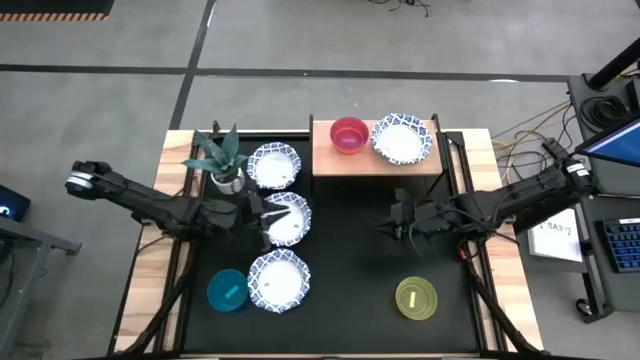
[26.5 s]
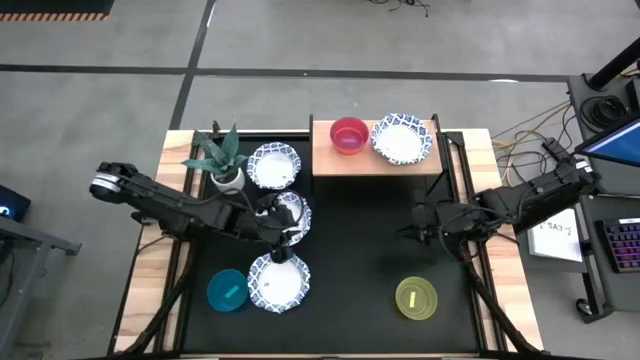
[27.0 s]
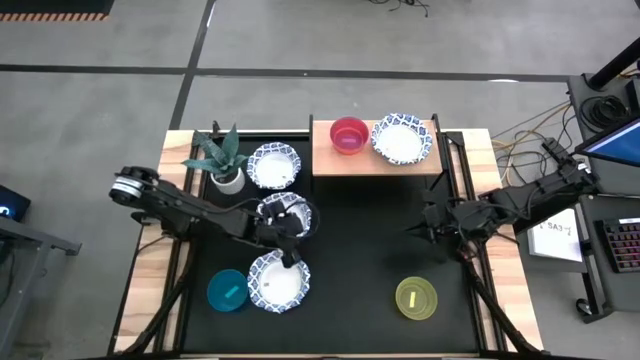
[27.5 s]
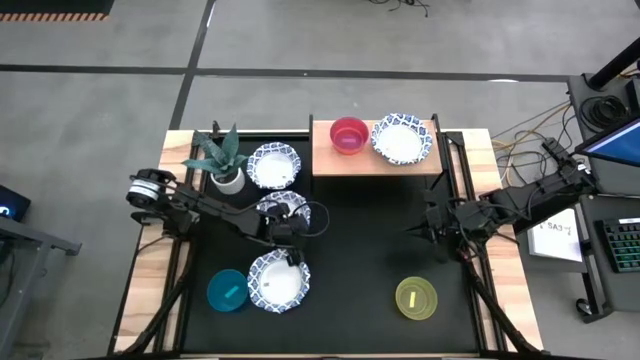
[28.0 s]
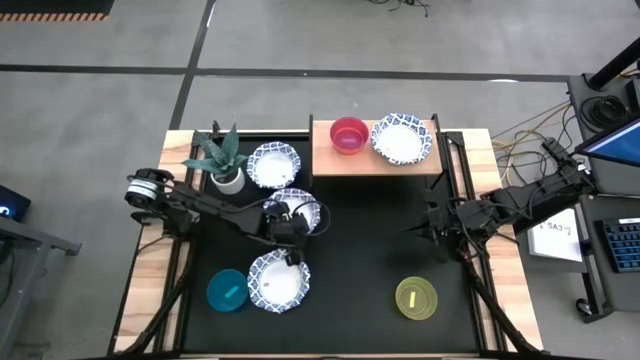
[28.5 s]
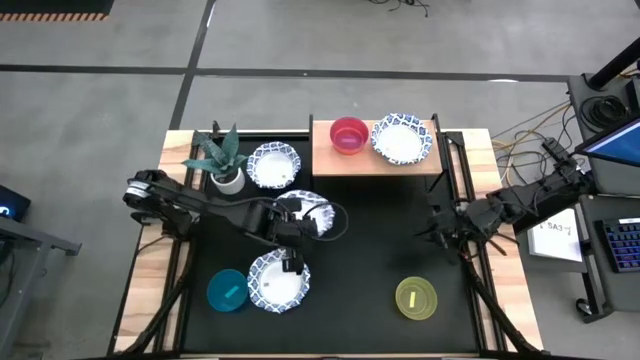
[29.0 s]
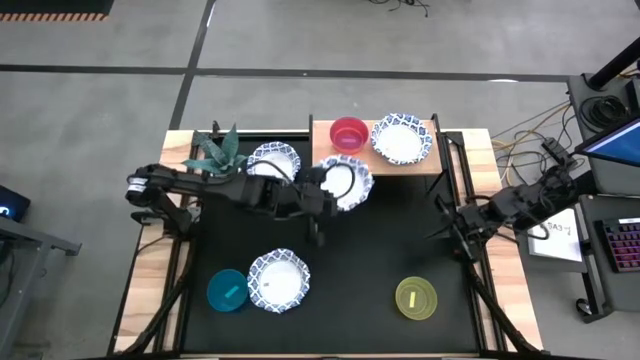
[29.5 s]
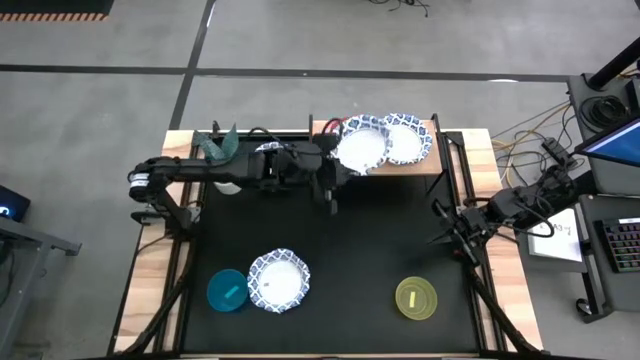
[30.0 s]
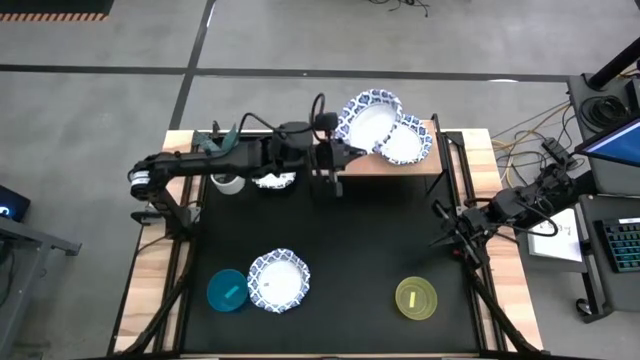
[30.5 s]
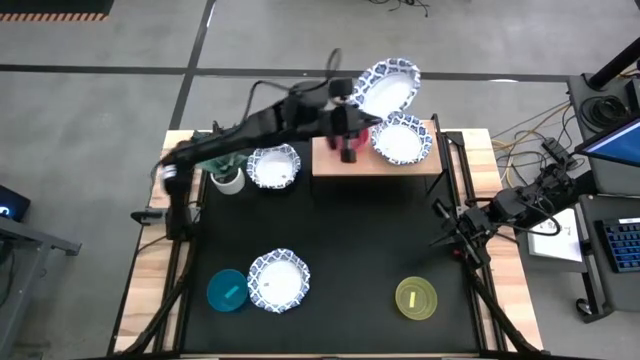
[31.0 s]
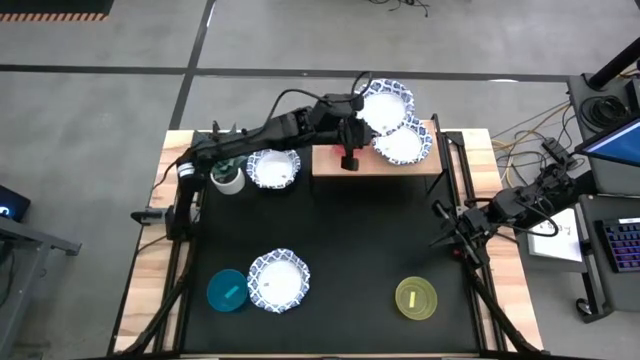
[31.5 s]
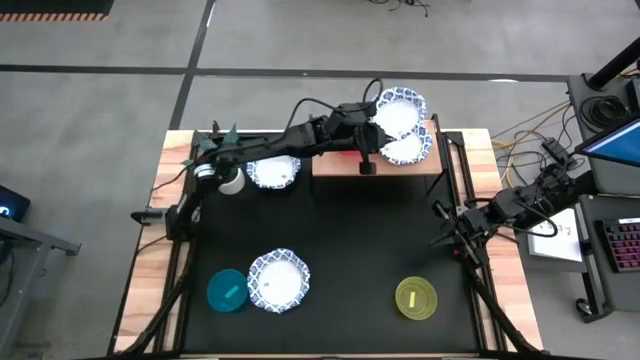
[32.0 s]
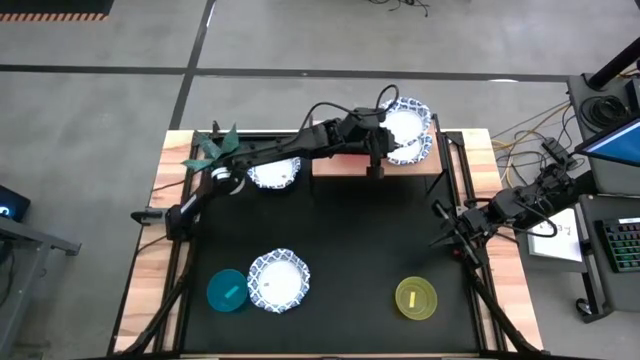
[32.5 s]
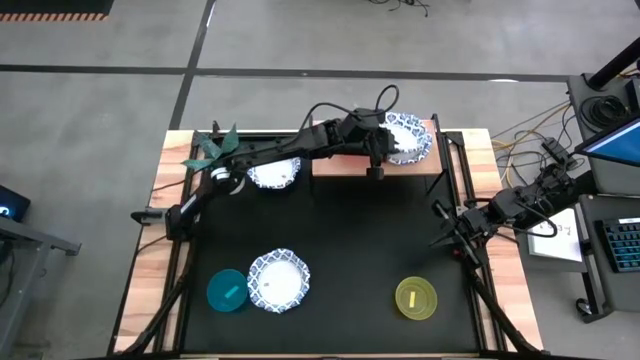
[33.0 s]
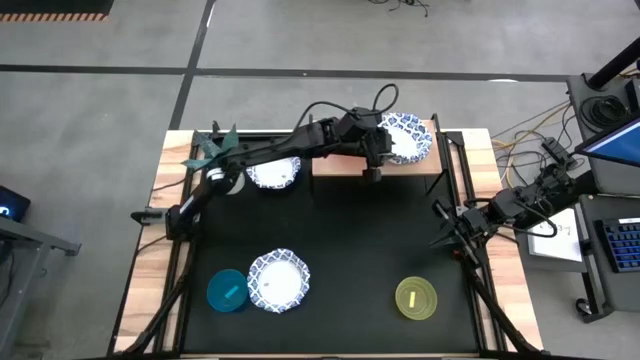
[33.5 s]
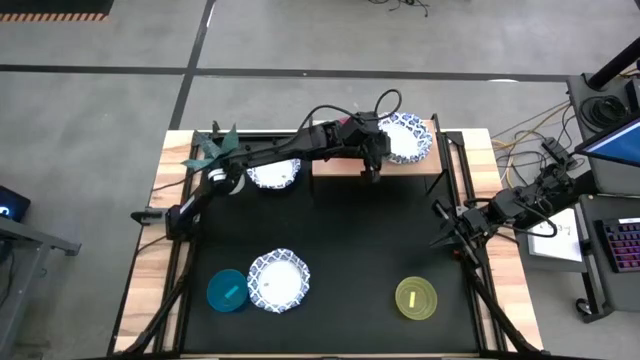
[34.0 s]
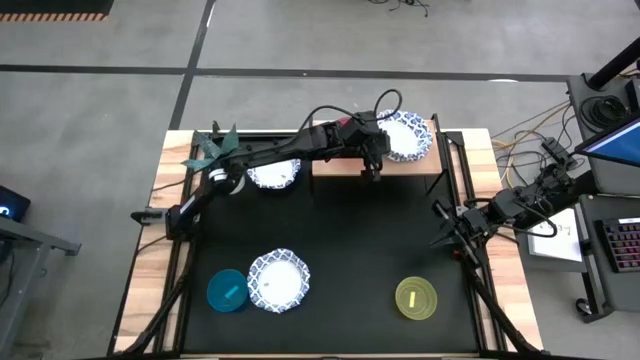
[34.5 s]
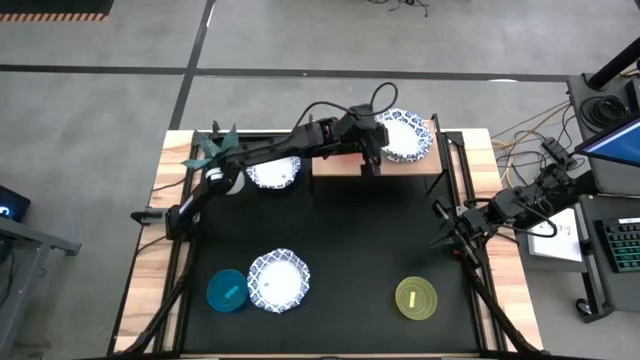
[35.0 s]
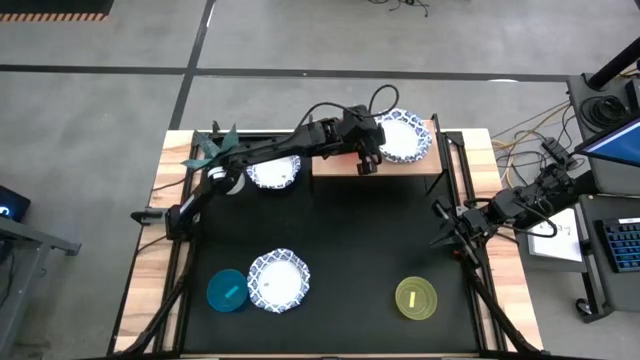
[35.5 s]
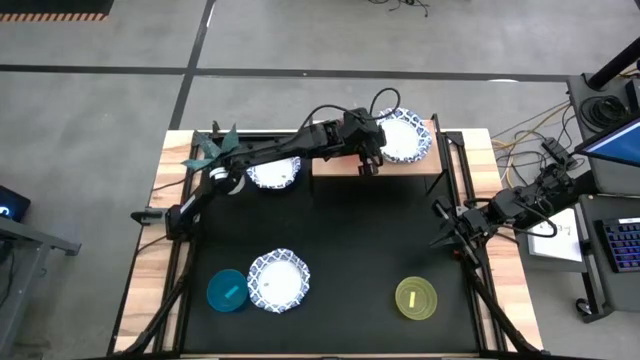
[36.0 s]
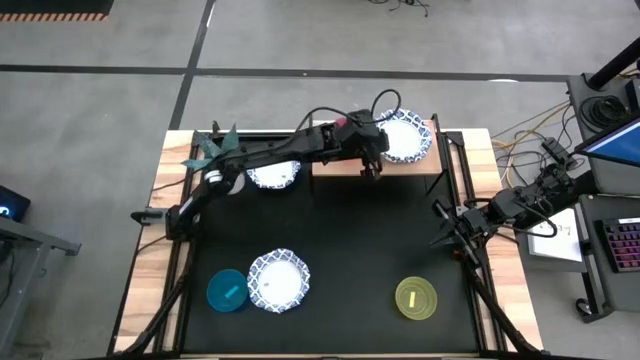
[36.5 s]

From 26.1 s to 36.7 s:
Task: Place and stack bowls onto a shelf
Stack the white paper plate on top of the white paper plate on the shelf

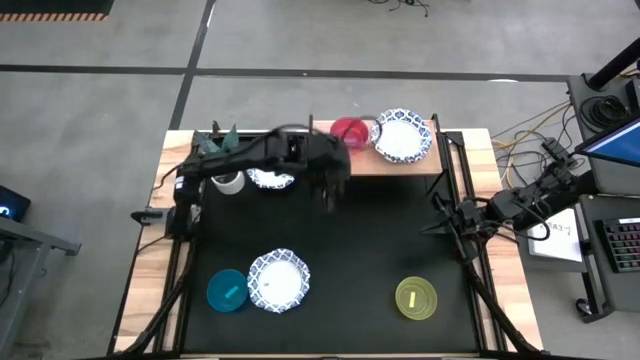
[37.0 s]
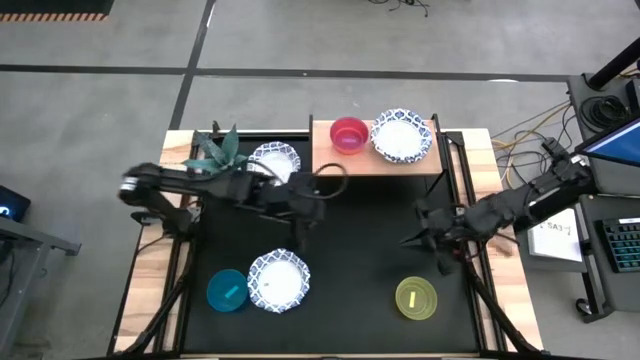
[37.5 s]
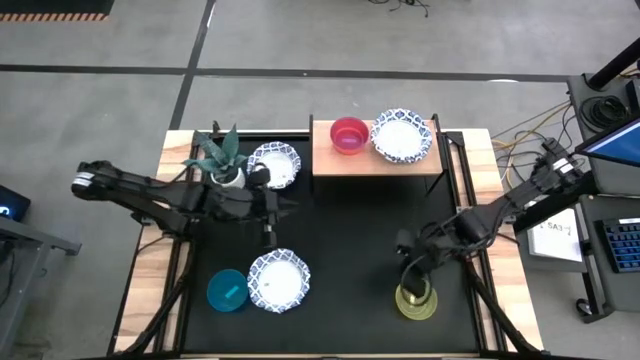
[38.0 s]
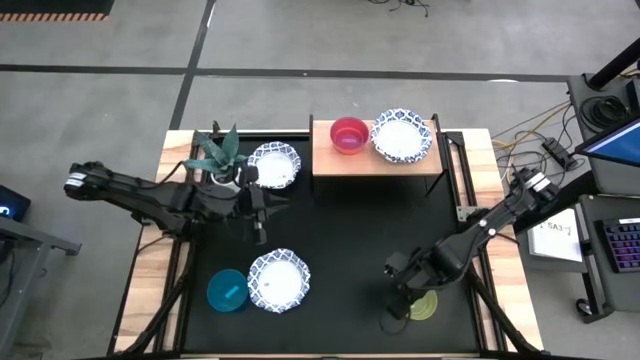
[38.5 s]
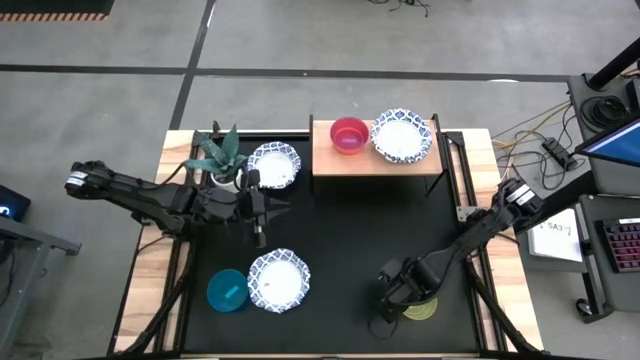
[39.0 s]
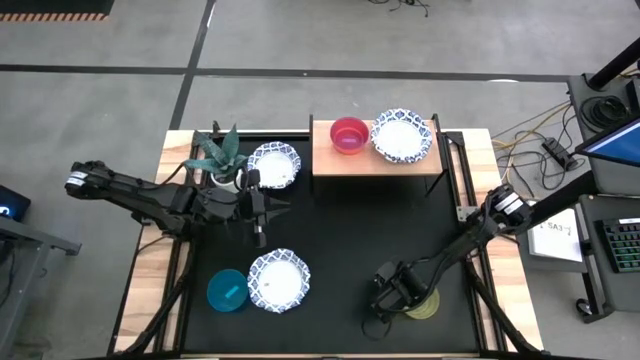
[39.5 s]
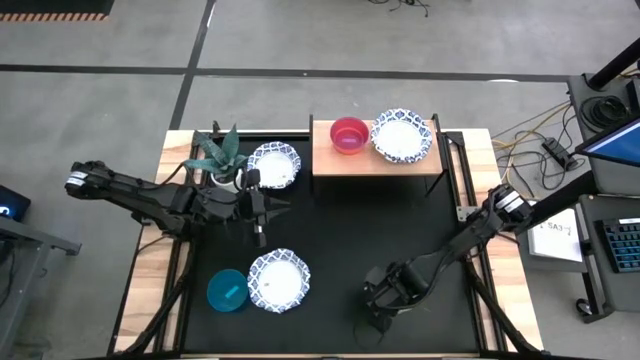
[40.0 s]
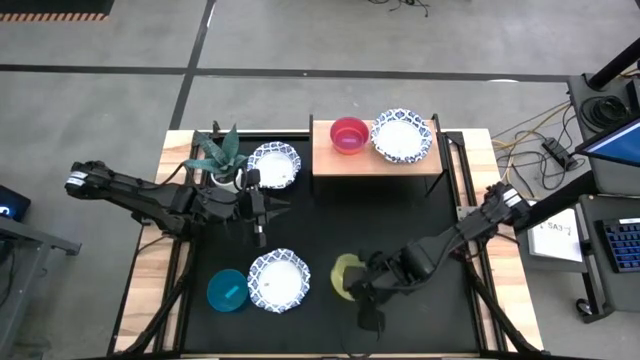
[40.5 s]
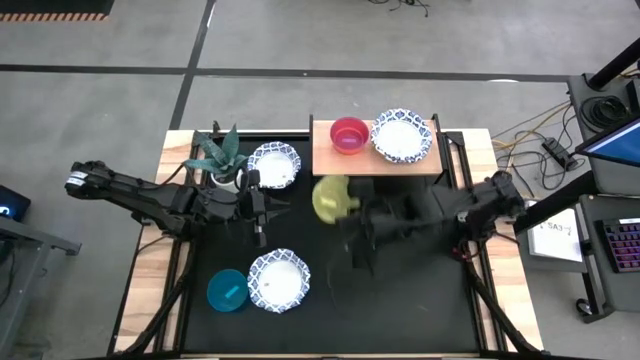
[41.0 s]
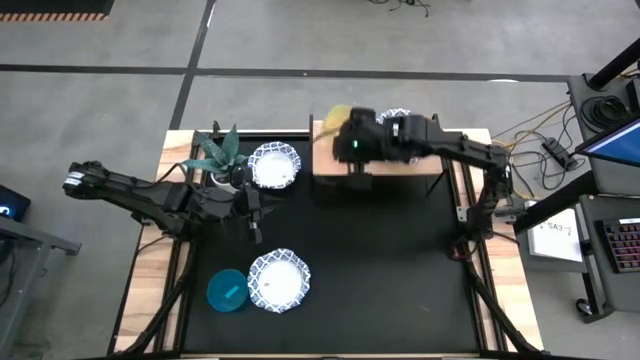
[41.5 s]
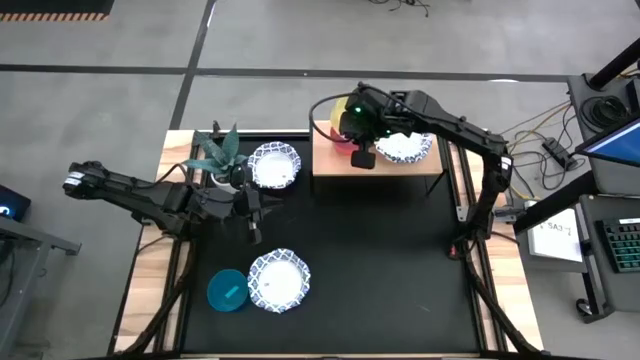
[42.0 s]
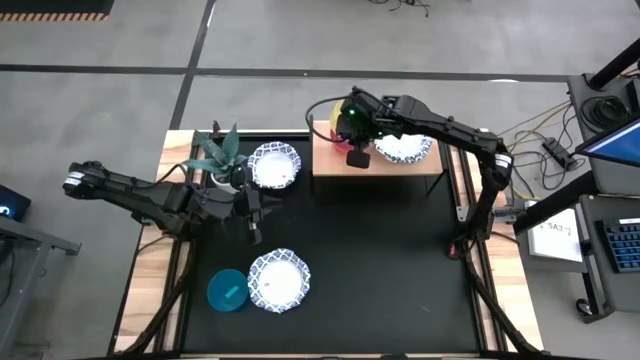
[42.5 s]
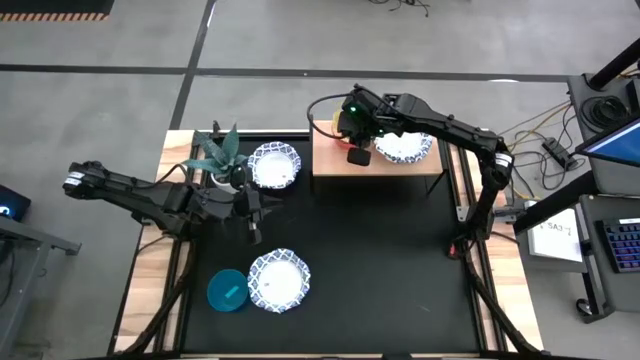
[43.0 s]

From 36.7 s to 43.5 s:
Stack the yellow bowl on the violet bowl on the stock shelf

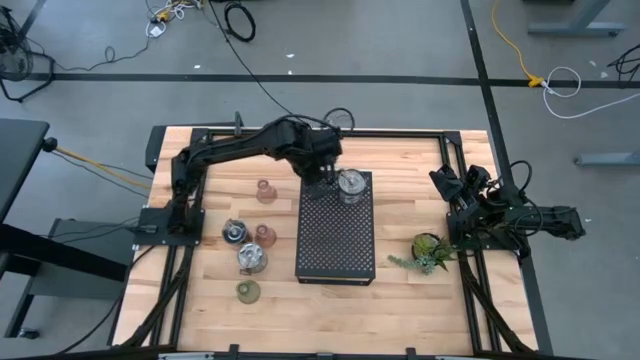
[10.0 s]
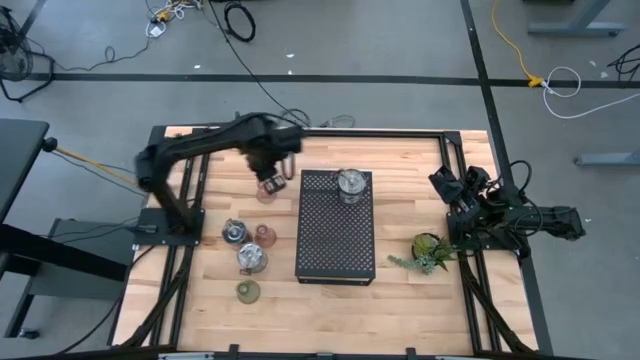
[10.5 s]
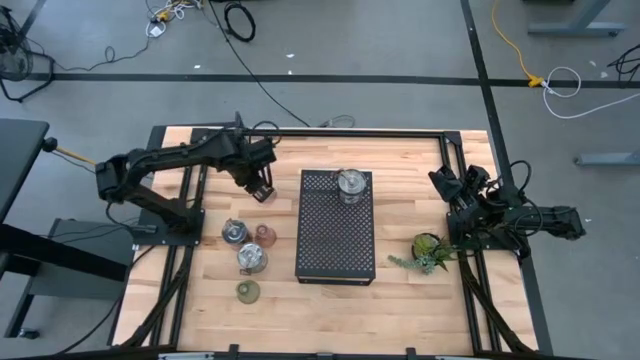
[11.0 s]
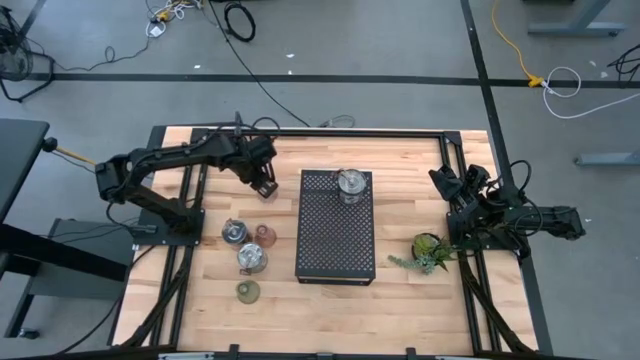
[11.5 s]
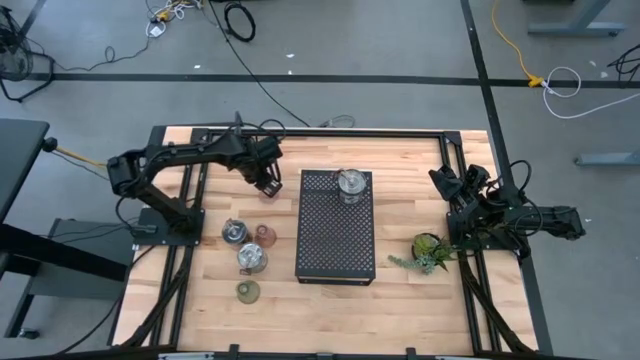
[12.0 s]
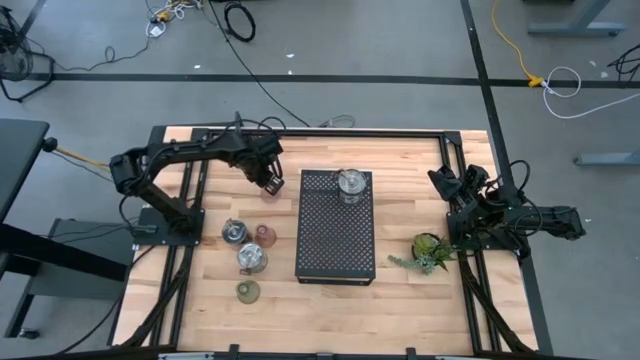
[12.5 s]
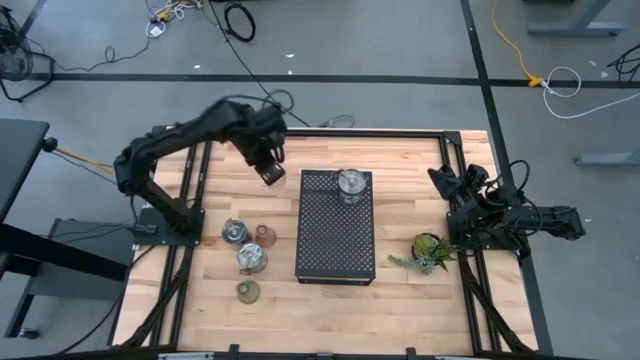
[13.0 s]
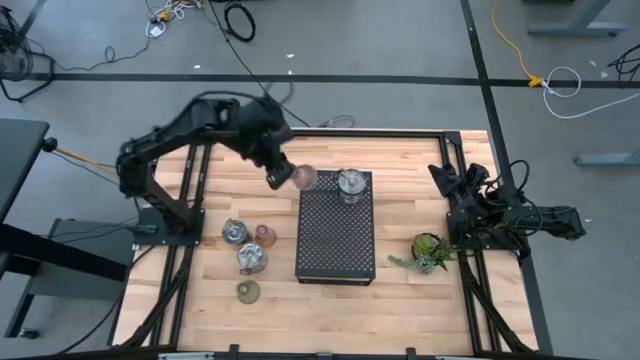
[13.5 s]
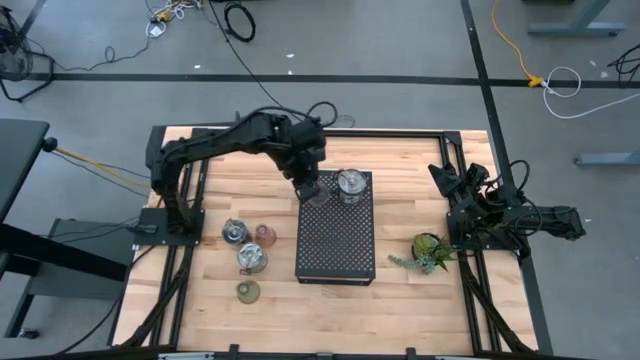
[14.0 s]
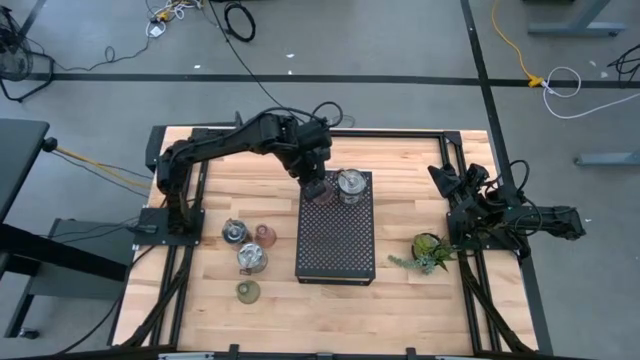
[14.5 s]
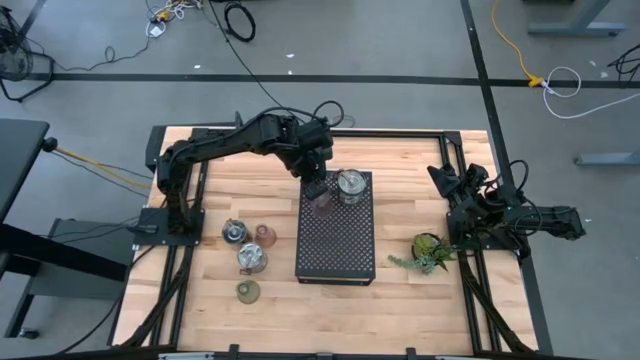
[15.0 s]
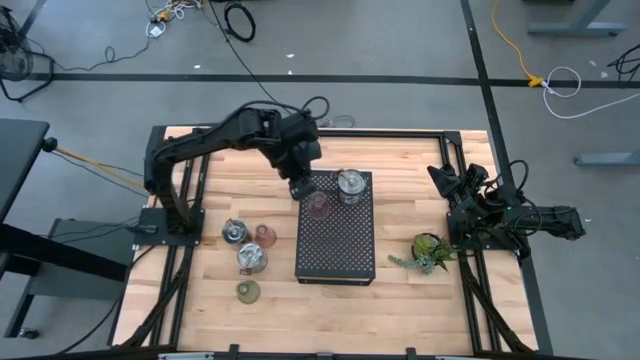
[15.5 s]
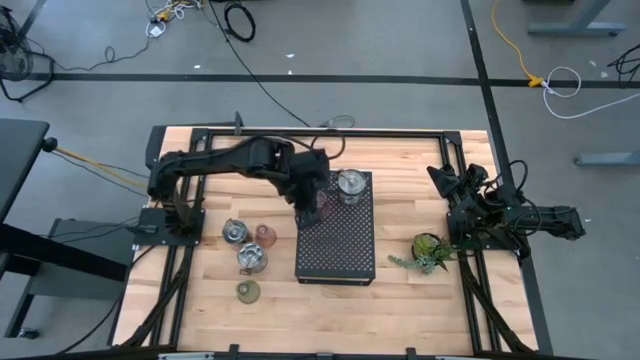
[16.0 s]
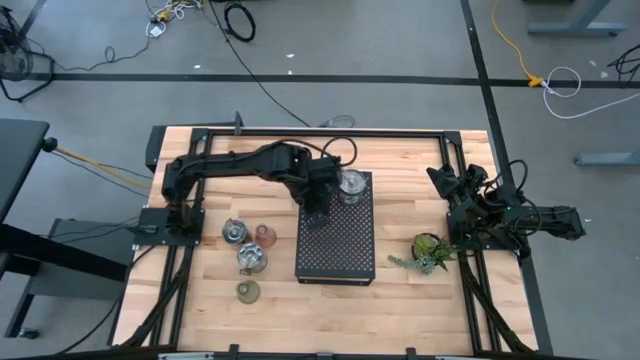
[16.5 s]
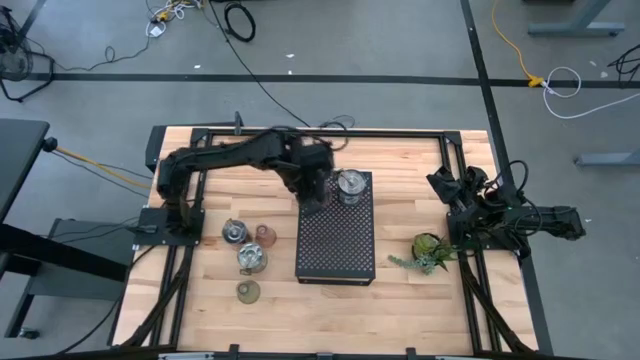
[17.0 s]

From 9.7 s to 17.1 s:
Task: Pick & Place candle stick holders
Put the top pink glass candle holder on the shelf
